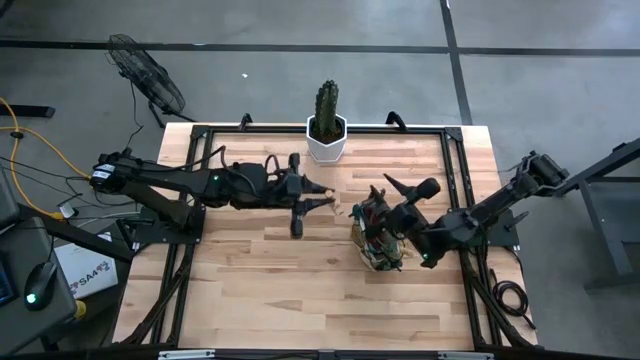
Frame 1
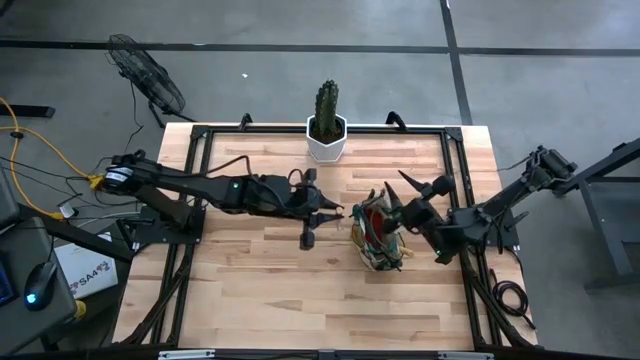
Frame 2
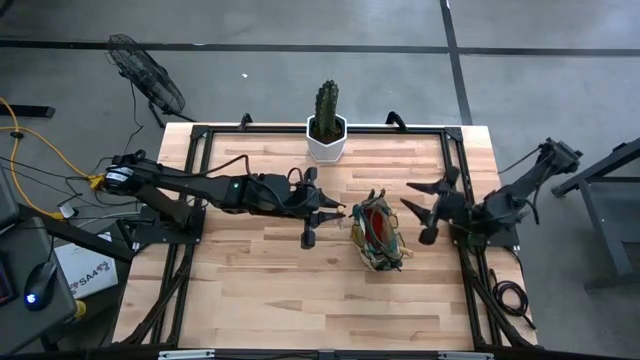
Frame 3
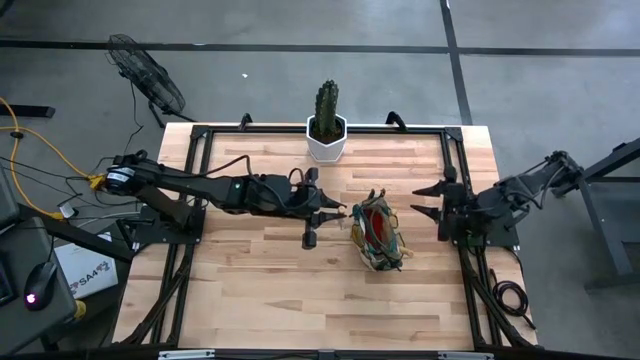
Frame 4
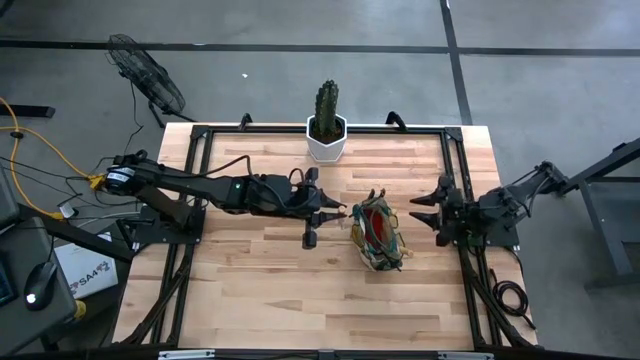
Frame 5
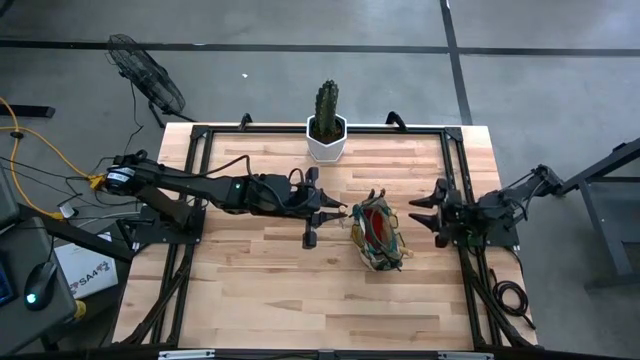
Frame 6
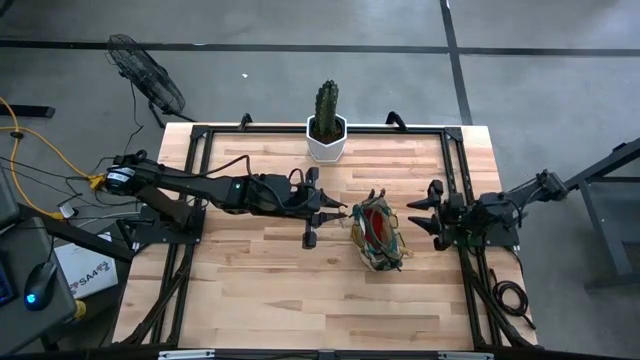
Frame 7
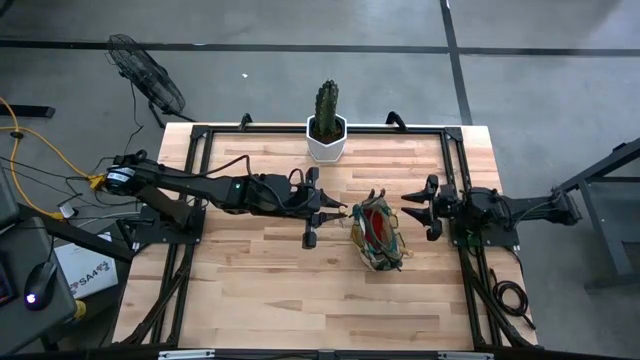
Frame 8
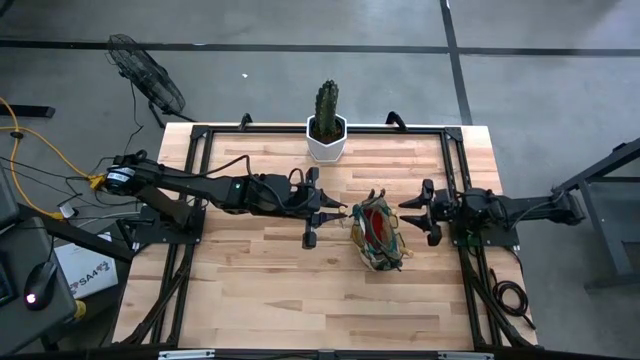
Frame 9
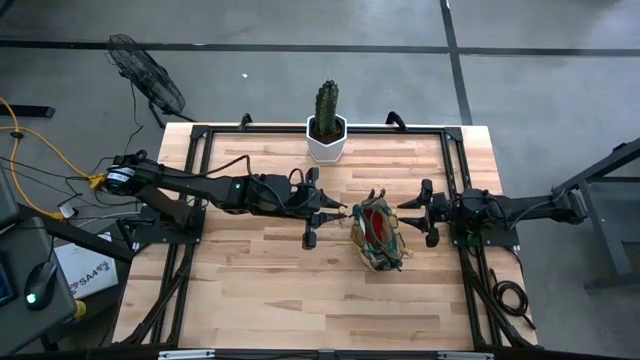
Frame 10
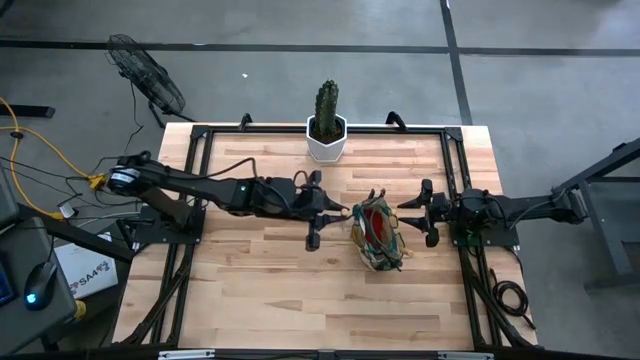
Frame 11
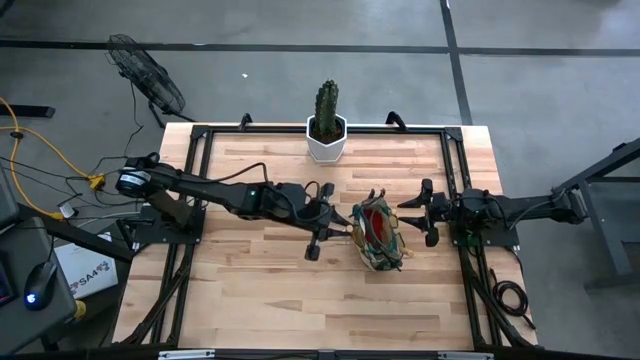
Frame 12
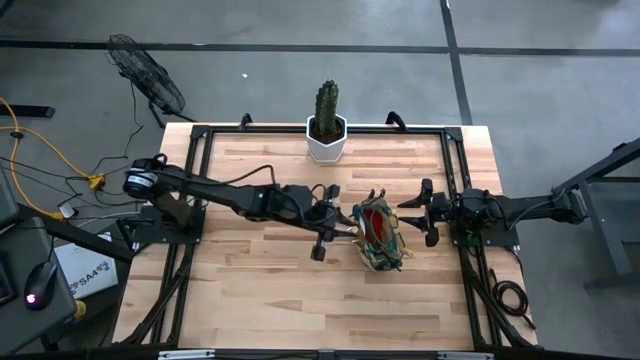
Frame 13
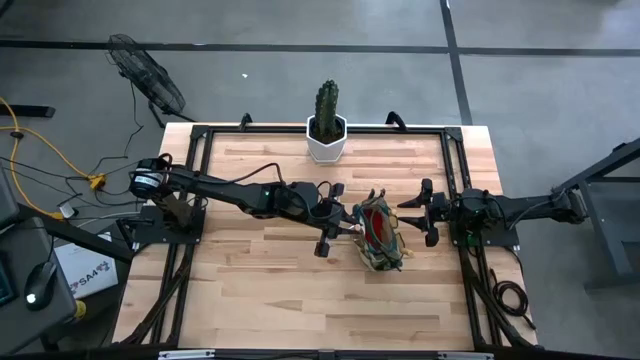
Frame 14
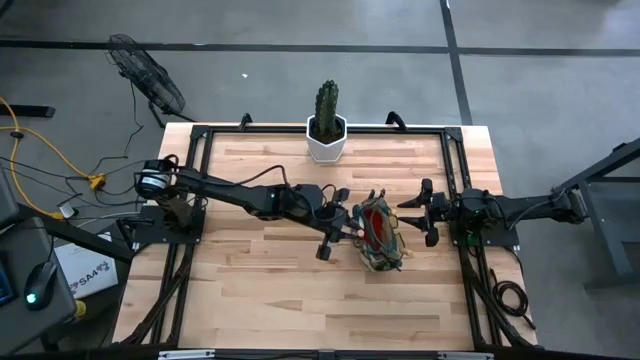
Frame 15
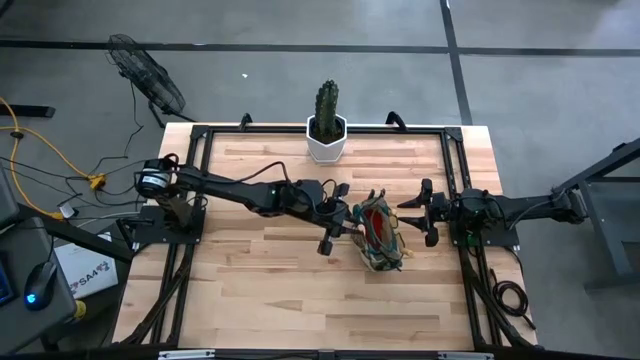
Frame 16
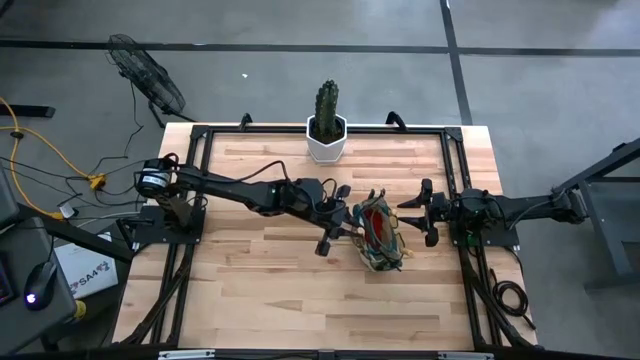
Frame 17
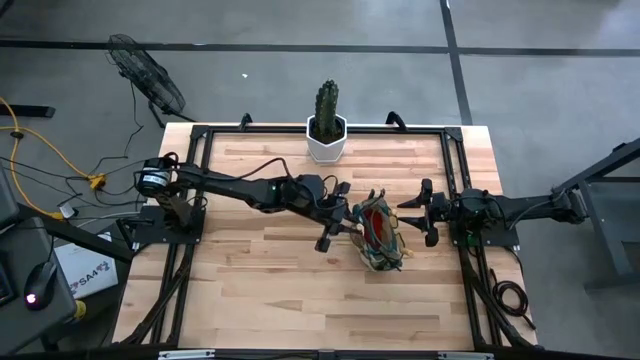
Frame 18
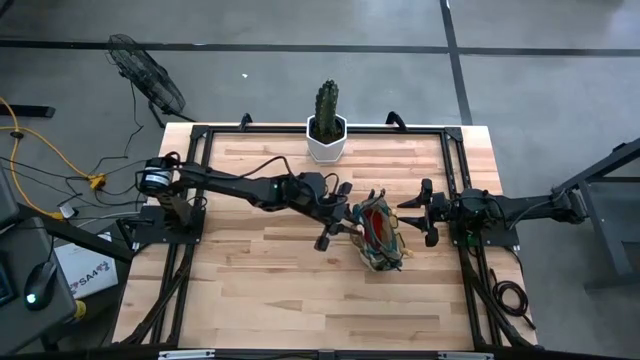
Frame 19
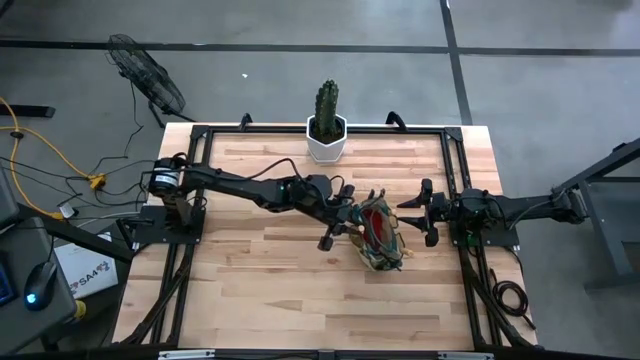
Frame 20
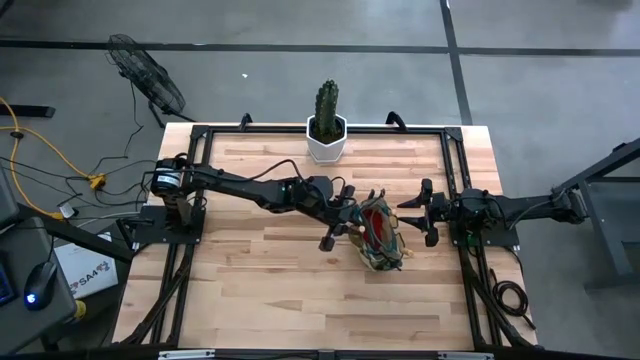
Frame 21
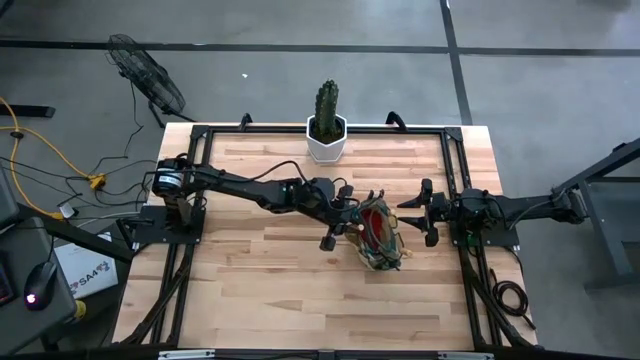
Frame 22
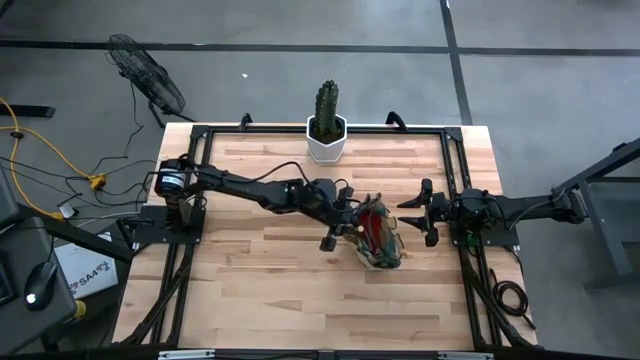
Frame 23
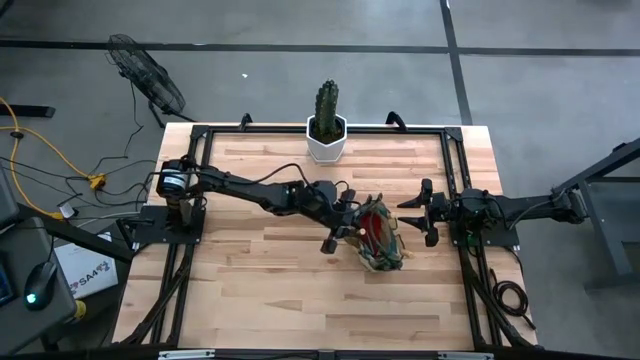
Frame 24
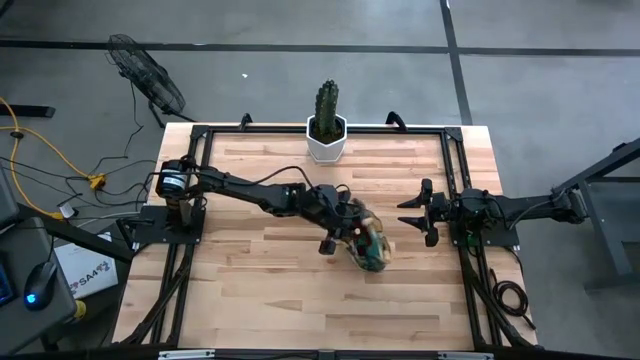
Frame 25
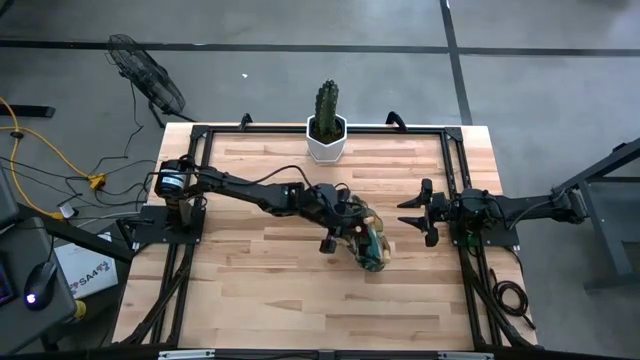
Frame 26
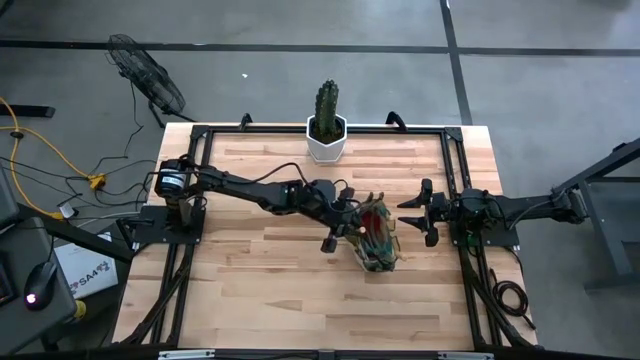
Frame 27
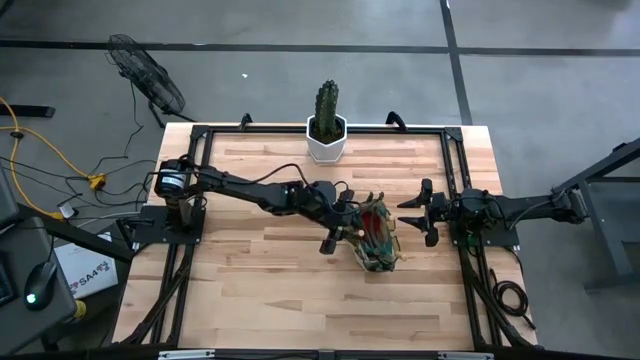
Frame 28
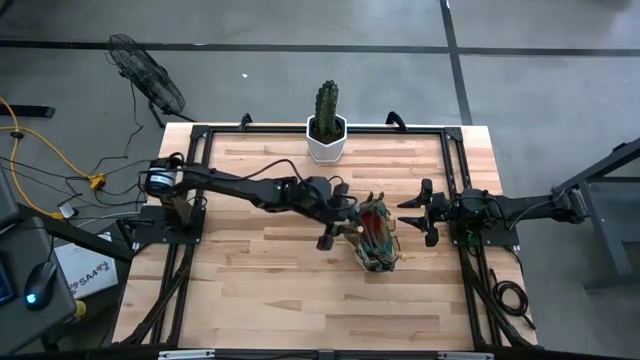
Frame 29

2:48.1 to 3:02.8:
Task: Pick & Place Garden tools in Gardening bag
Put the brown hand rake into the brown gardening bag

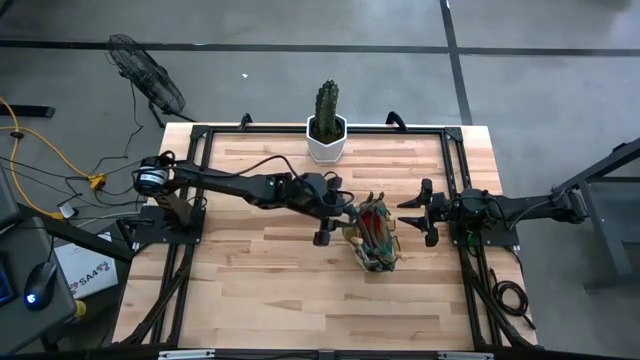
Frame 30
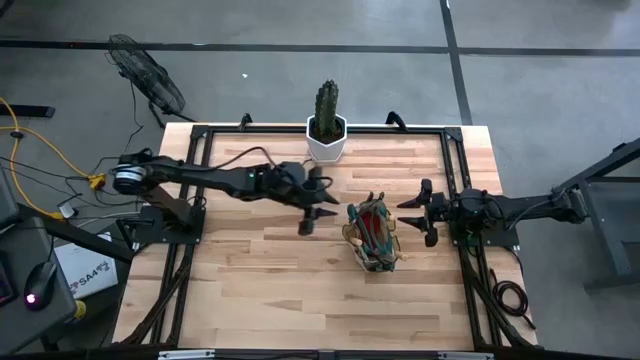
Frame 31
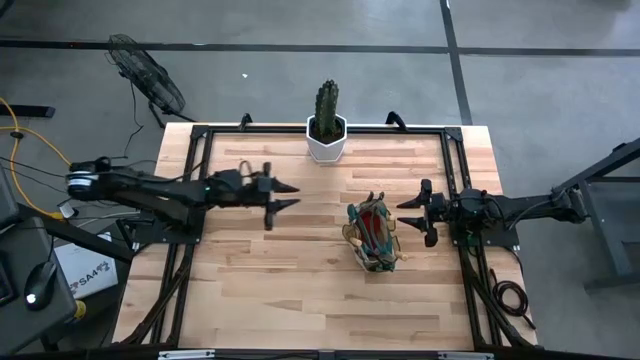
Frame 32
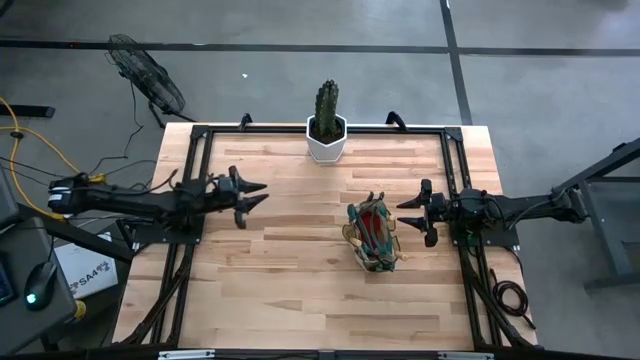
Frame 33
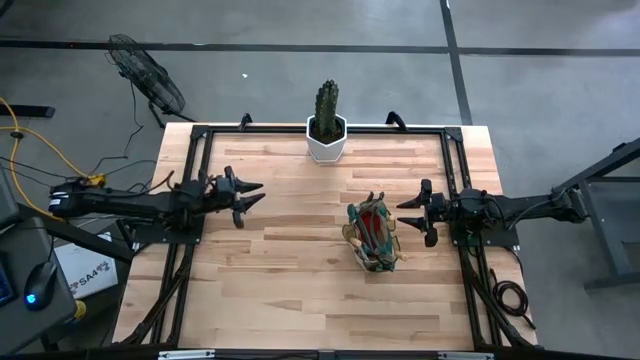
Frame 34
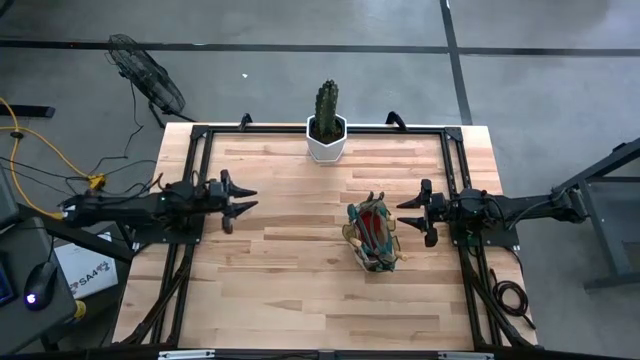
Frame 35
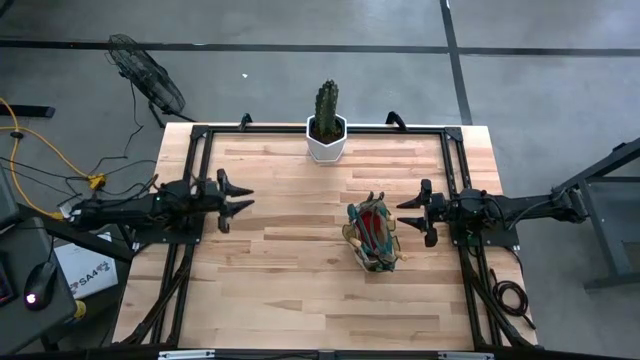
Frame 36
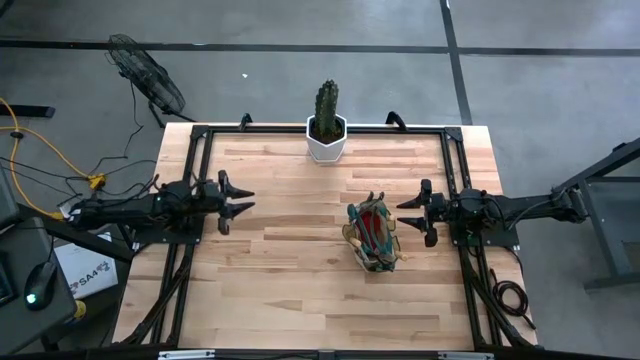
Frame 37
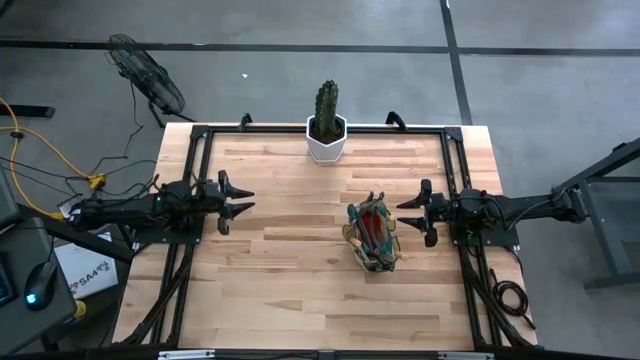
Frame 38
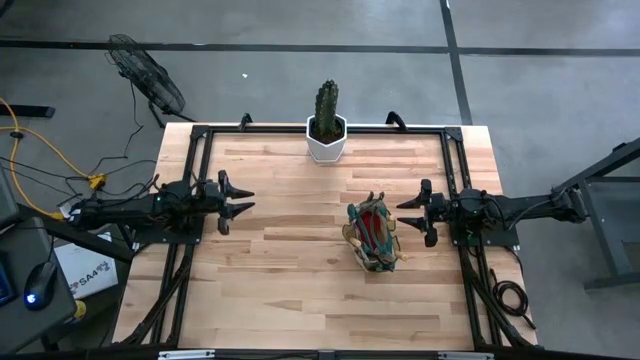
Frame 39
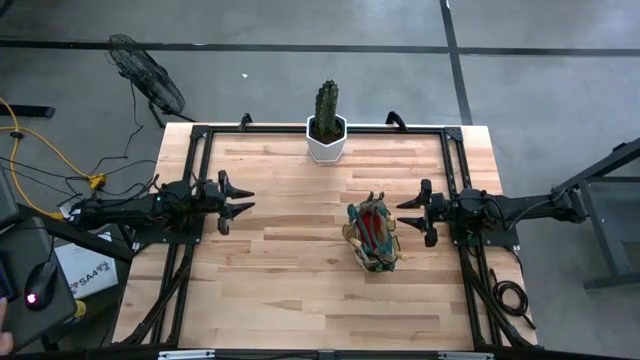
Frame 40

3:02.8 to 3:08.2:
Return to Home Position

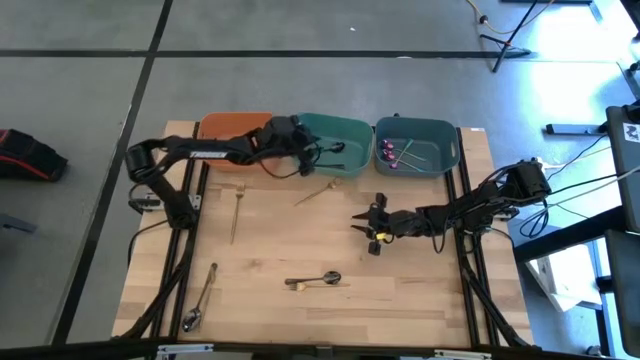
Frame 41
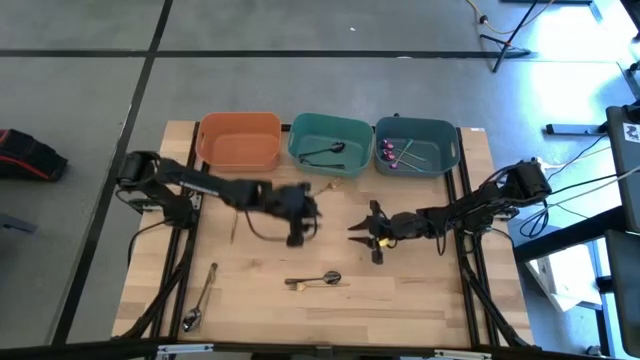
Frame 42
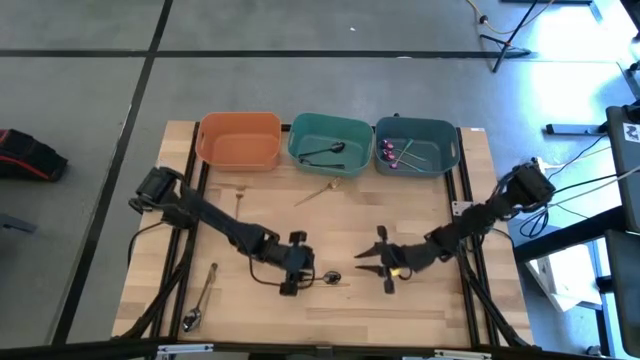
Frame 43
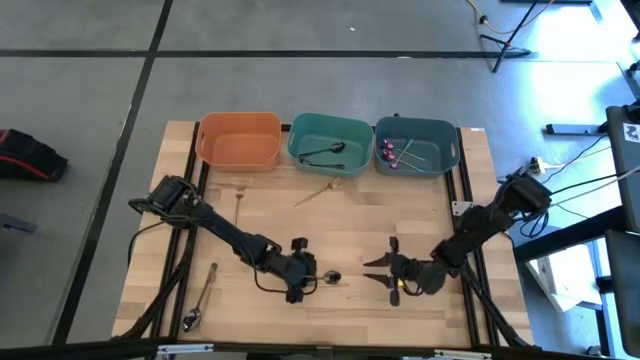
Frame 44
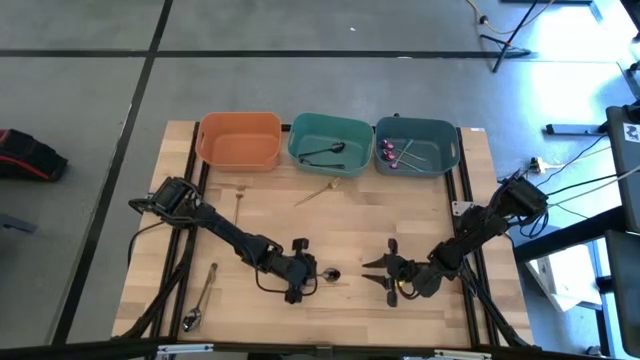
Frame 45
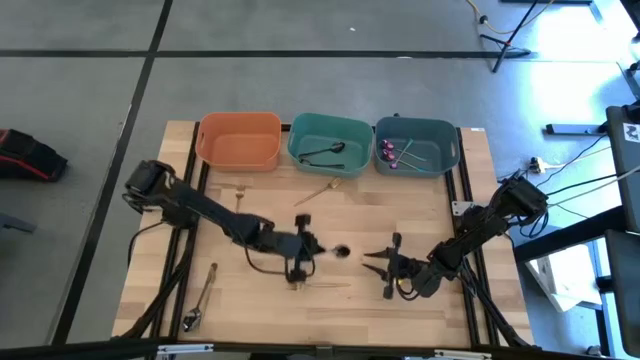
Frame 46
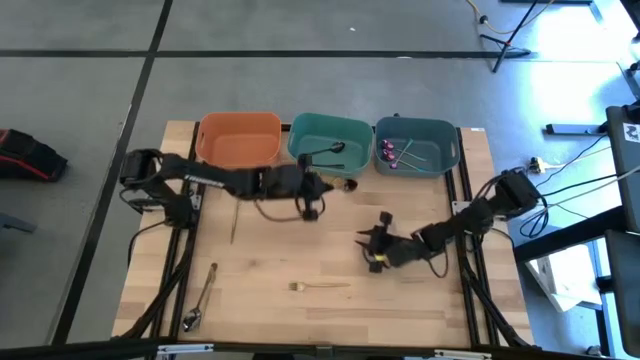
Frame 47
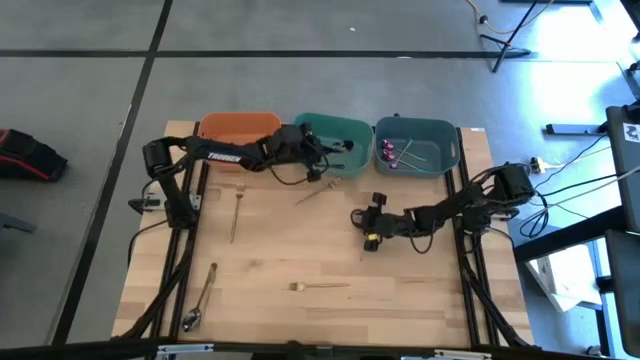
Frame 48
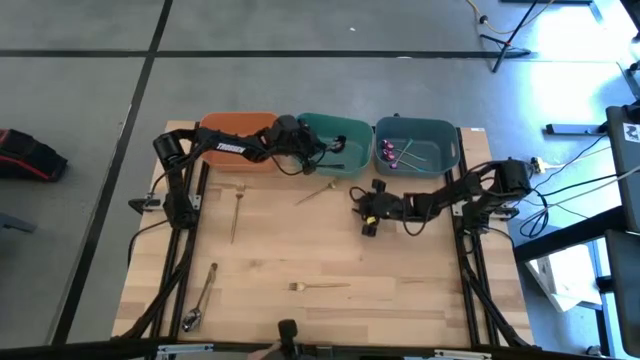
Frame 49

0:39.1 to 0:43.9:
Task: Sort silverware by color (type)
Put the black spoon into the green bin
